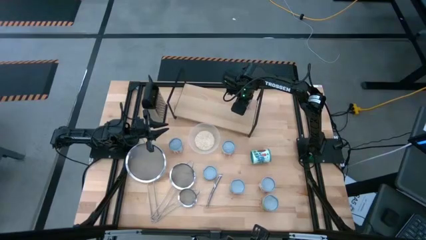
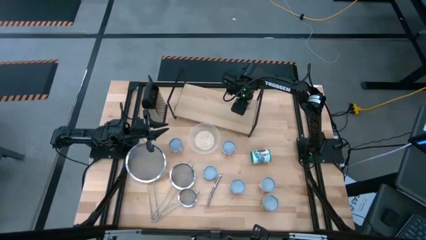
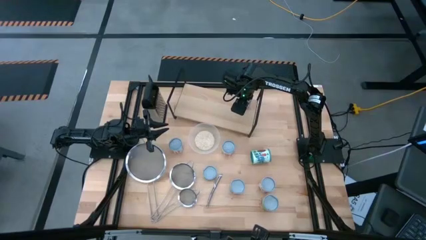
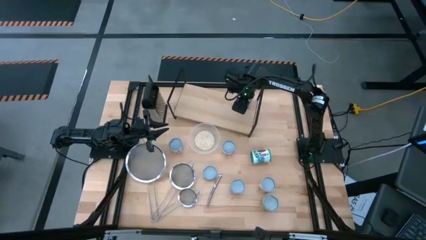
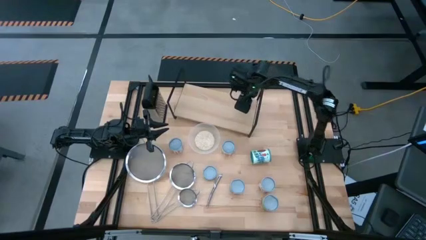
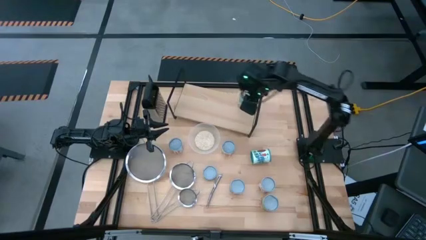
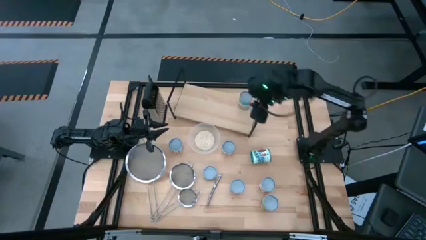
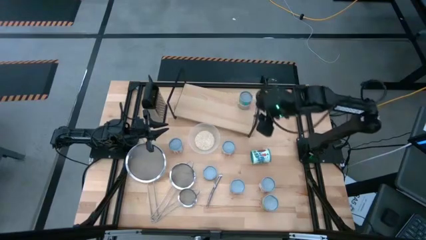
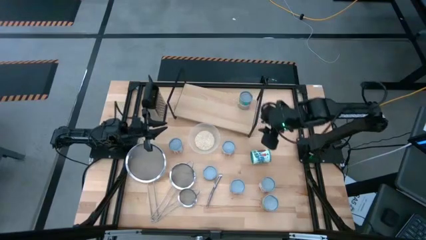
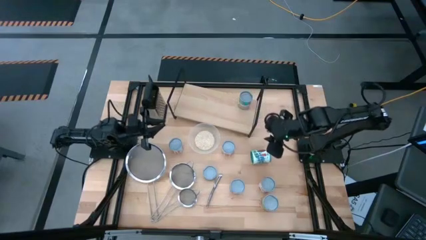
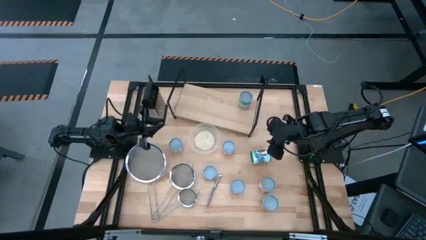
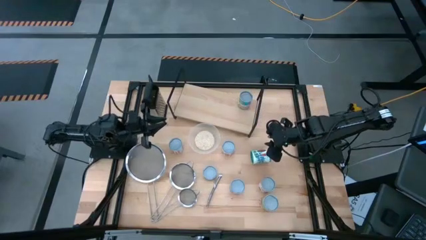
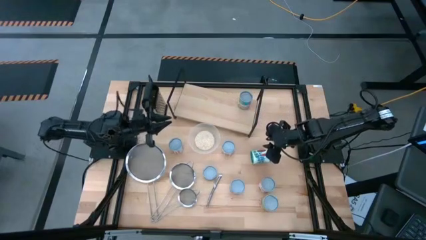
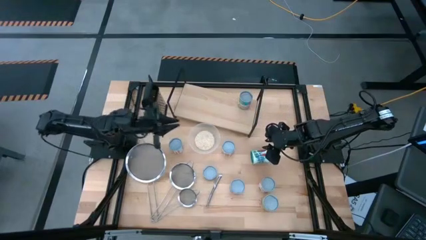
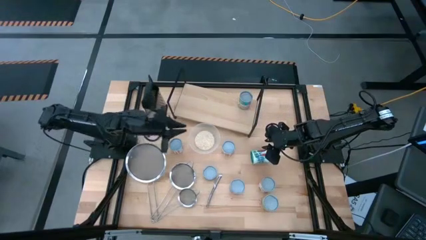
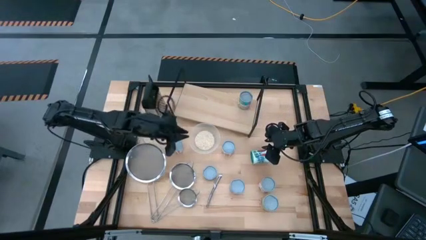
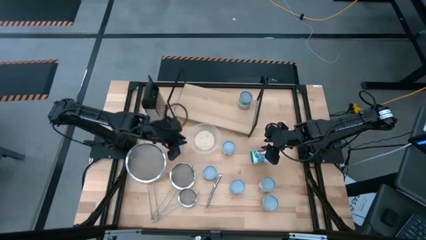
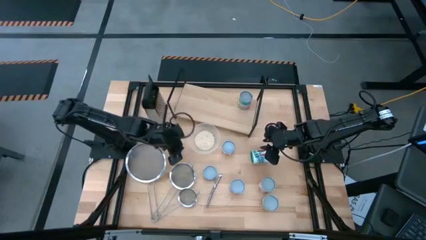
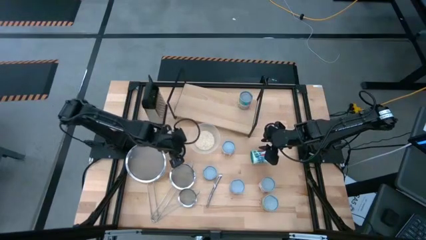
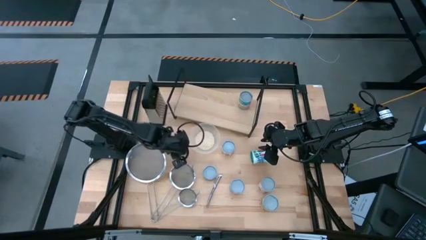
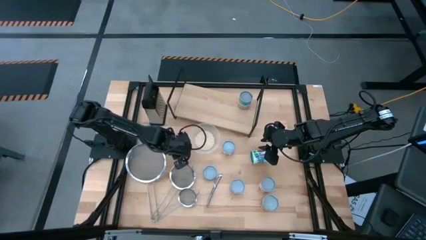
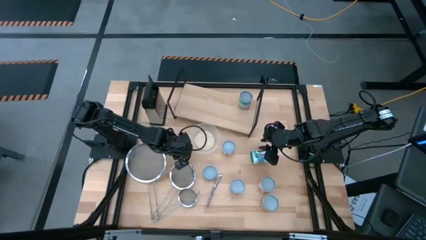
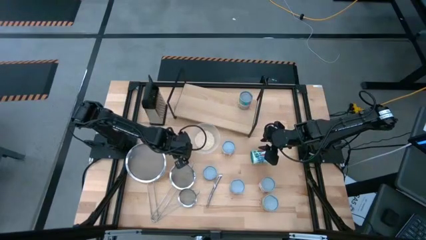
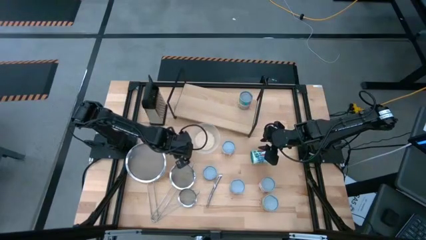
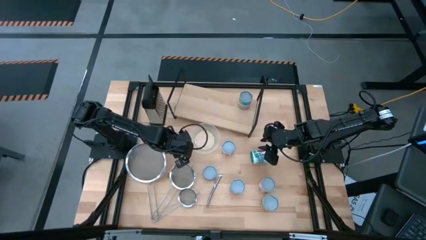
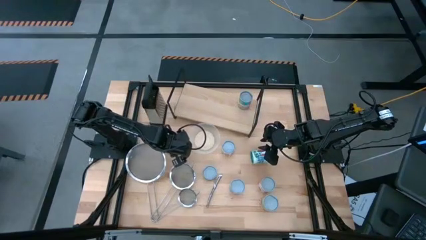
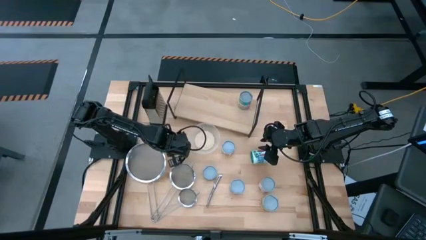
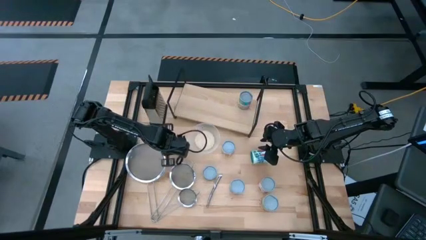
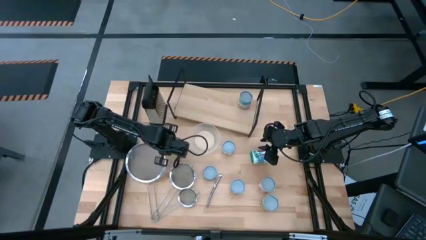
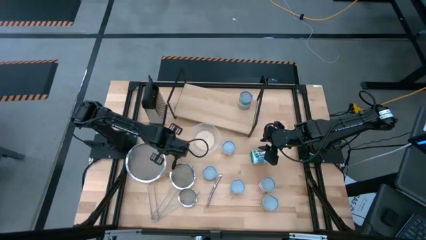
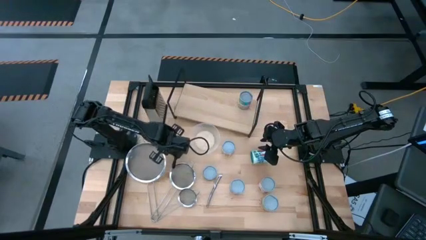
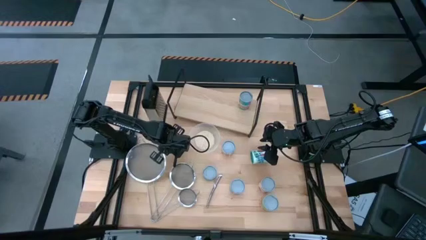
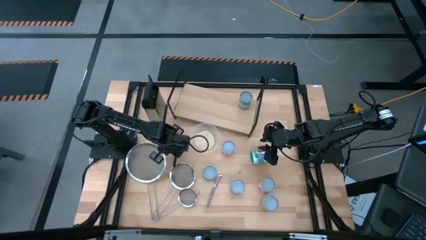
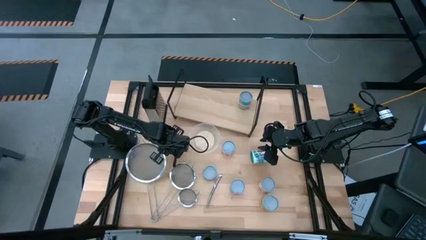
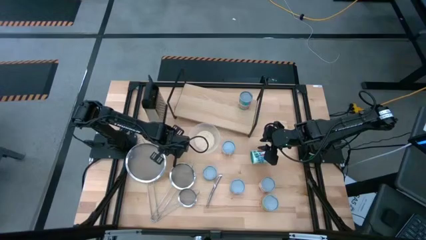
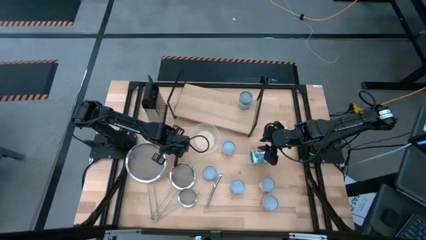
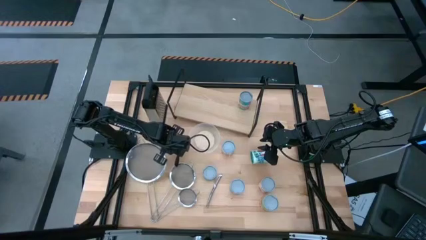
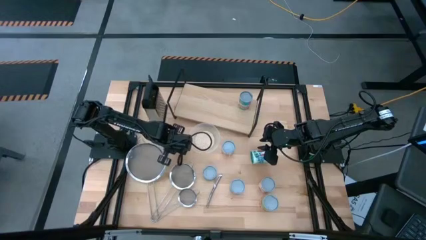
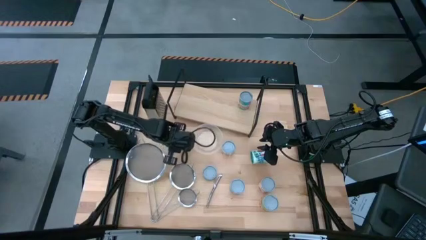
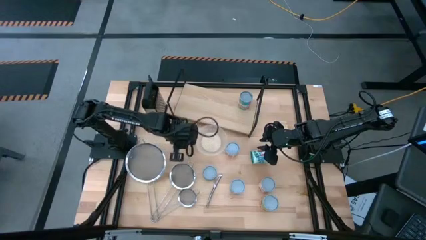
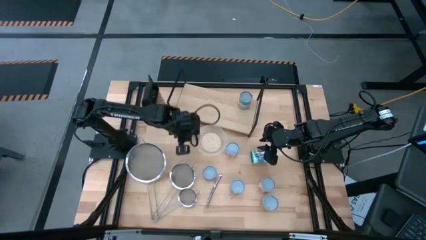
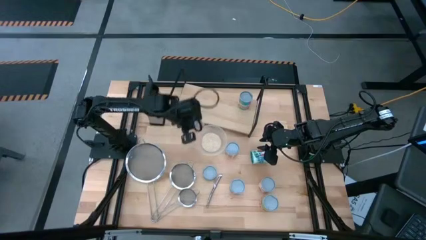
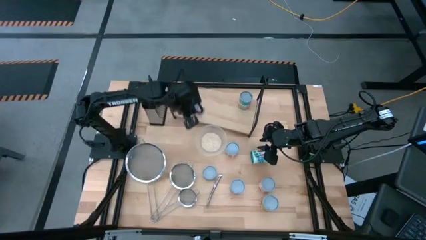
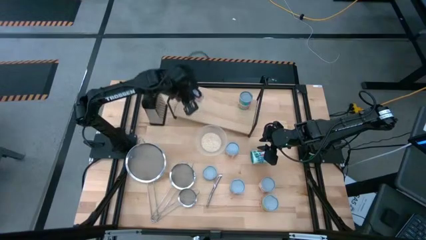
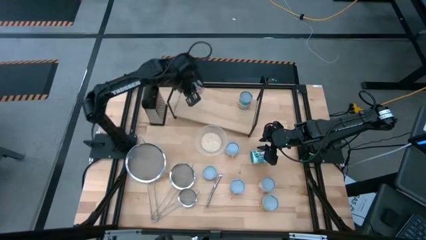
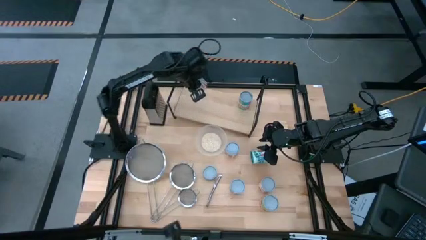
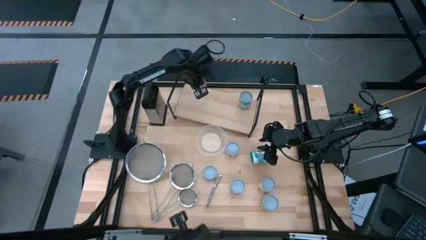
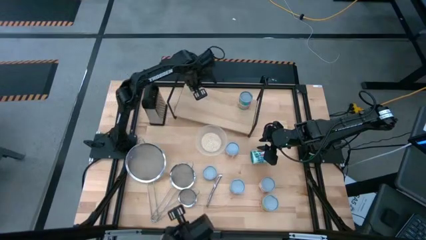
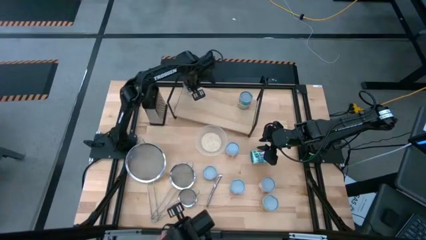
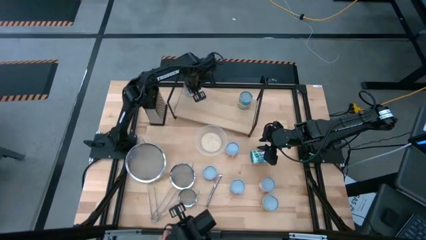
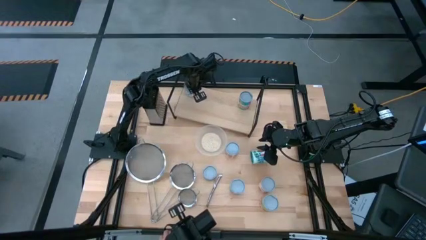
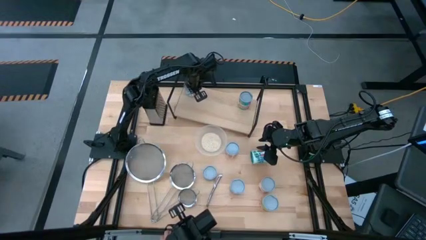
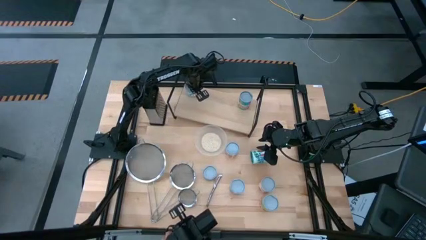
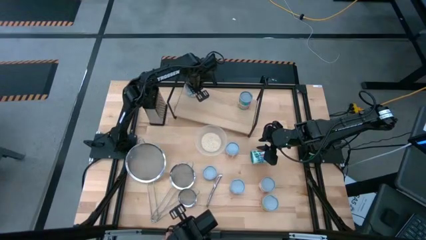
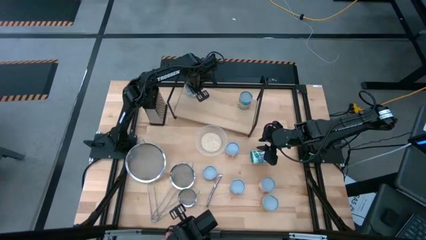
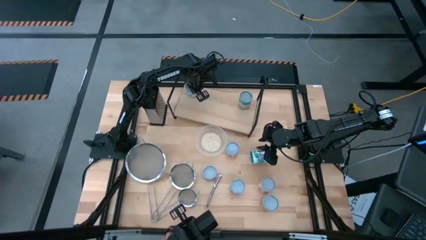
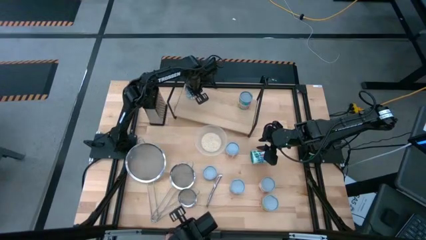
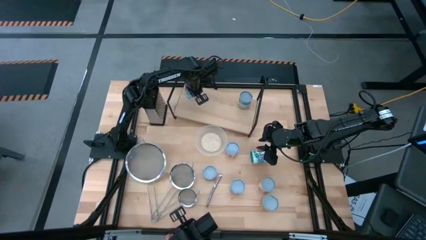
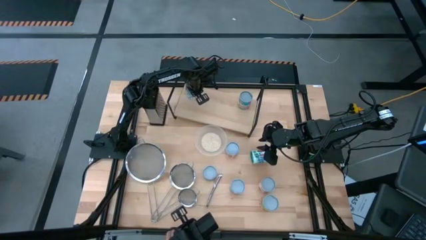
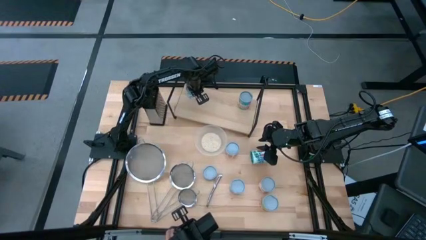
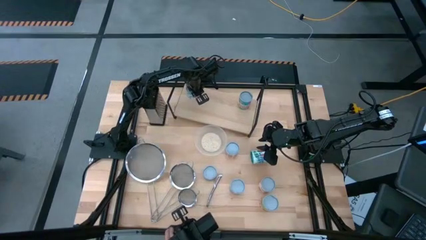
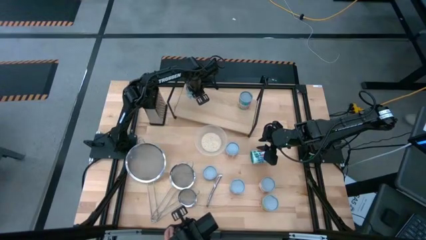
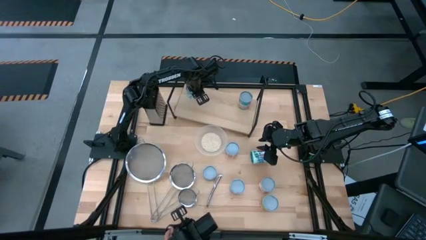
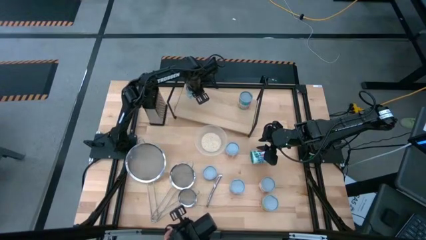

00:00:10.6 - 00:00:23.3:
Task: Pick and place cans onto a shelf
Put the canned carrots on the shelf
